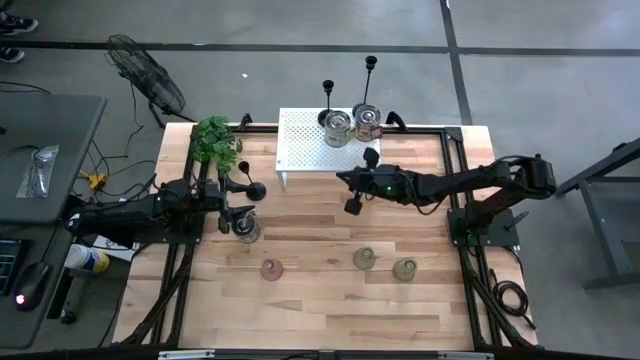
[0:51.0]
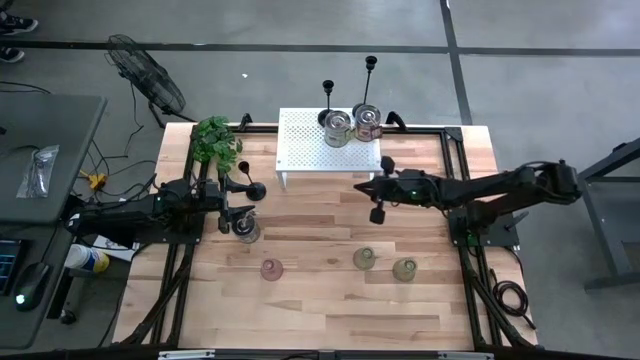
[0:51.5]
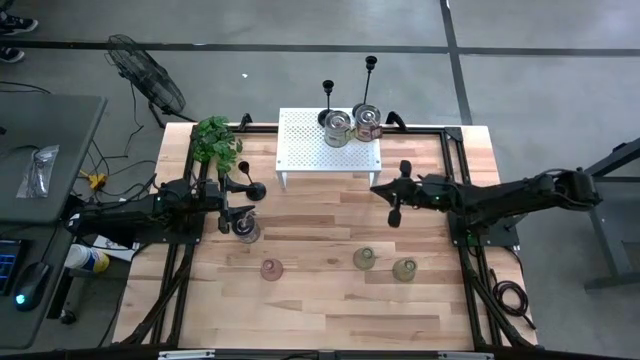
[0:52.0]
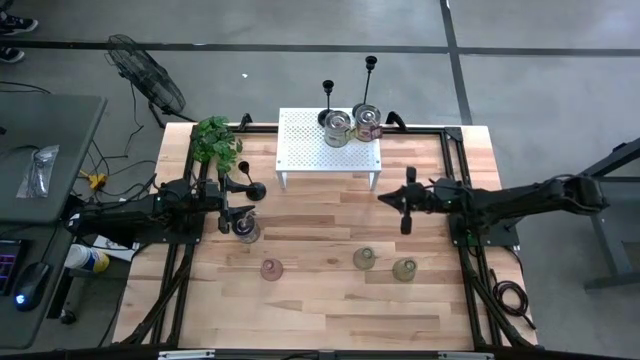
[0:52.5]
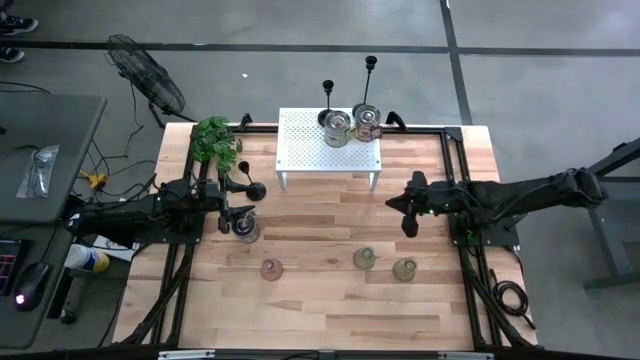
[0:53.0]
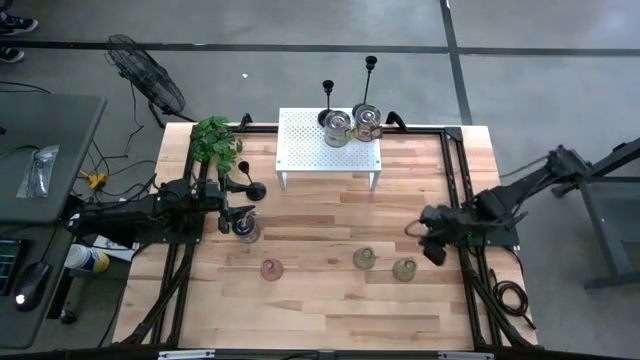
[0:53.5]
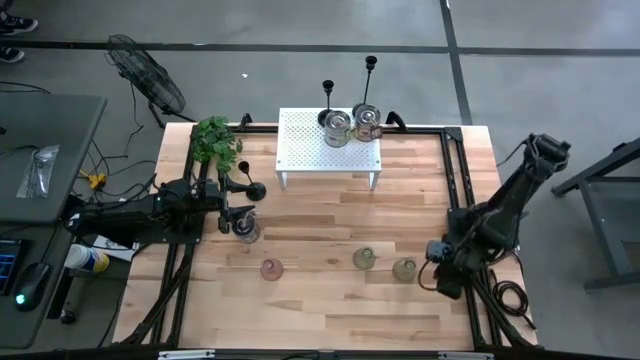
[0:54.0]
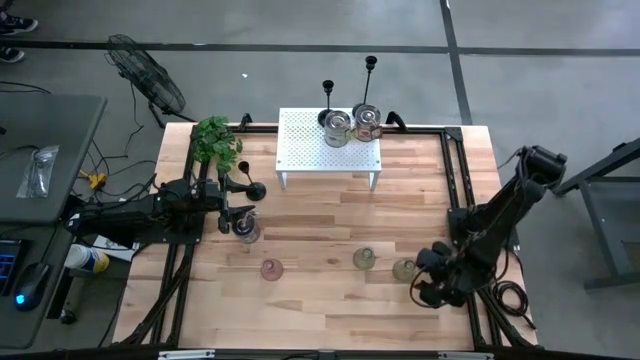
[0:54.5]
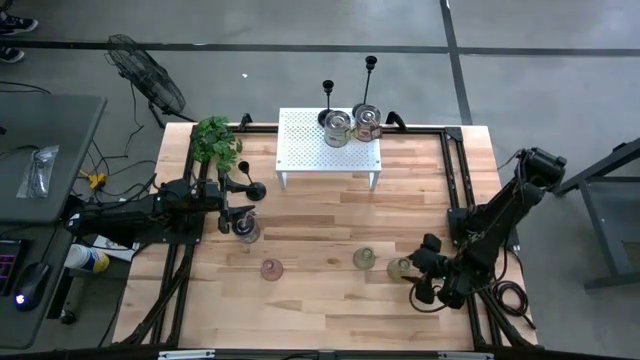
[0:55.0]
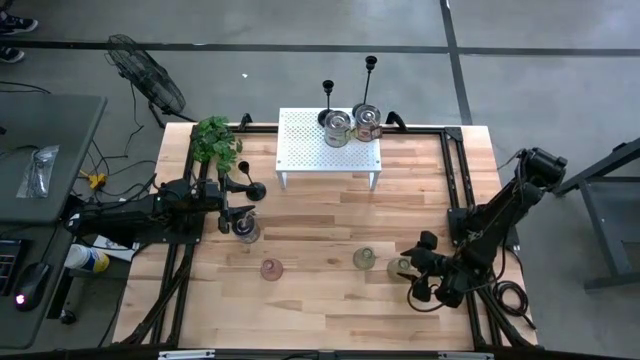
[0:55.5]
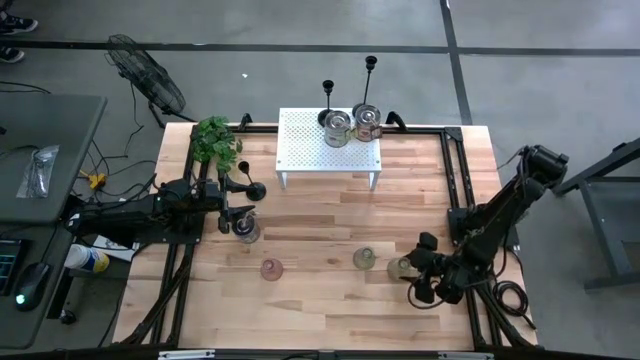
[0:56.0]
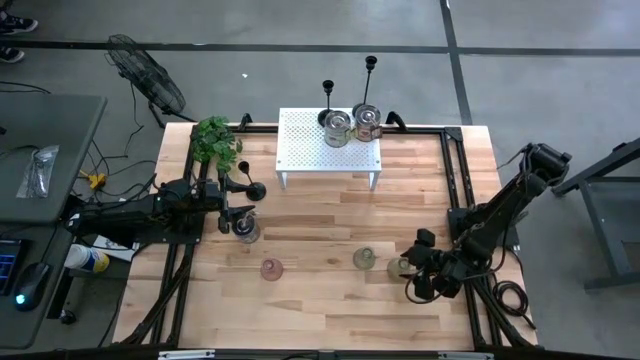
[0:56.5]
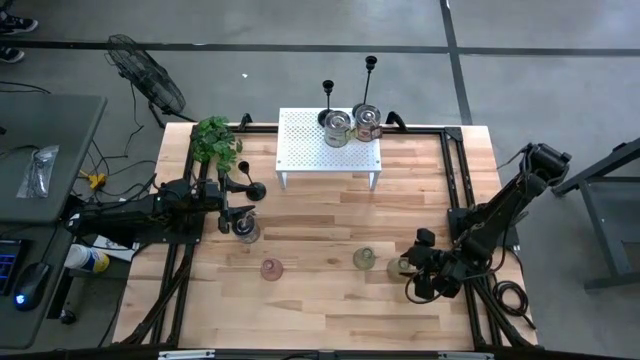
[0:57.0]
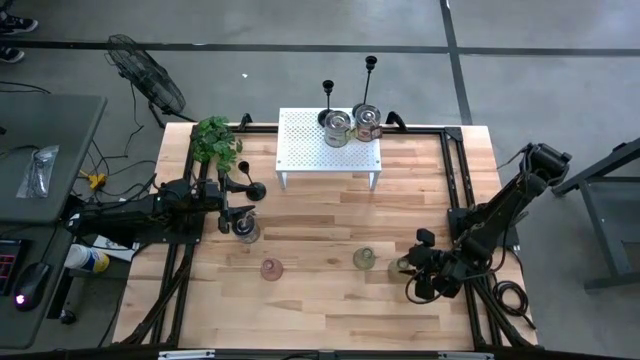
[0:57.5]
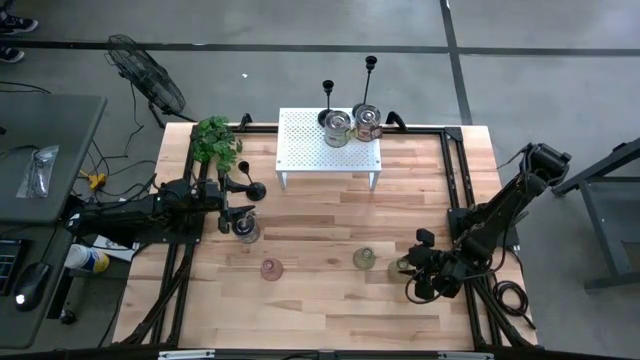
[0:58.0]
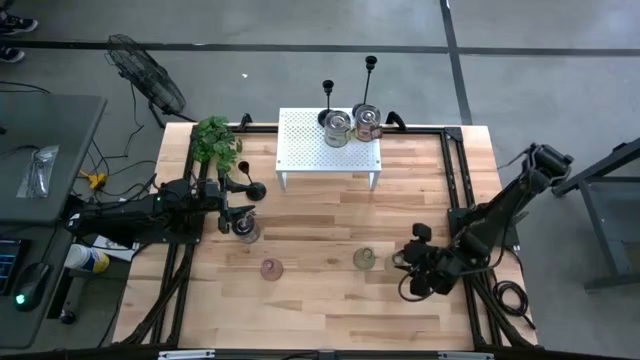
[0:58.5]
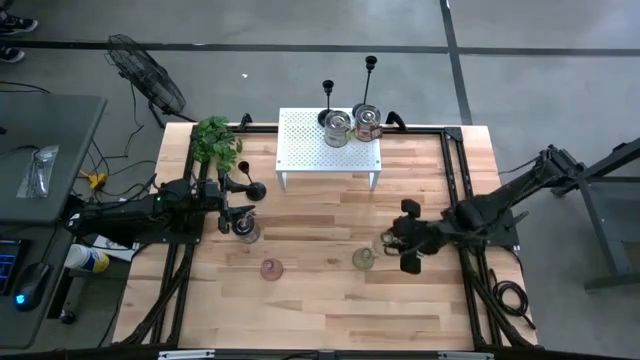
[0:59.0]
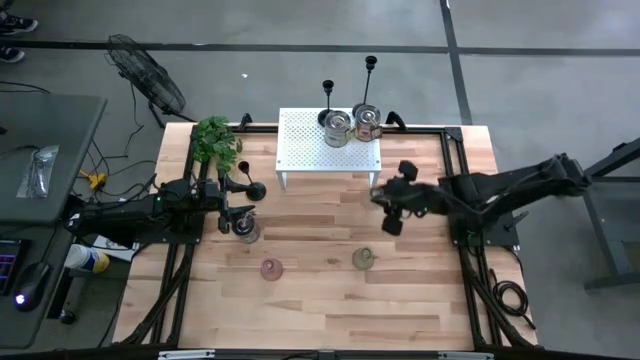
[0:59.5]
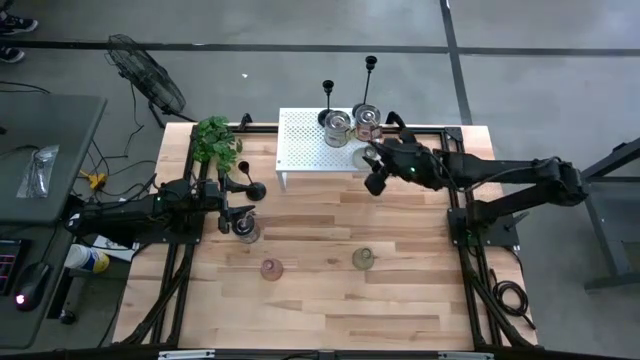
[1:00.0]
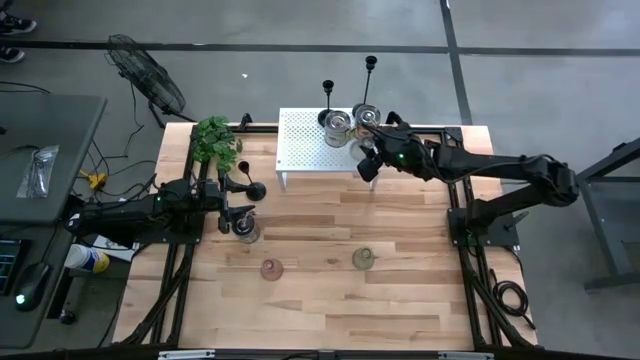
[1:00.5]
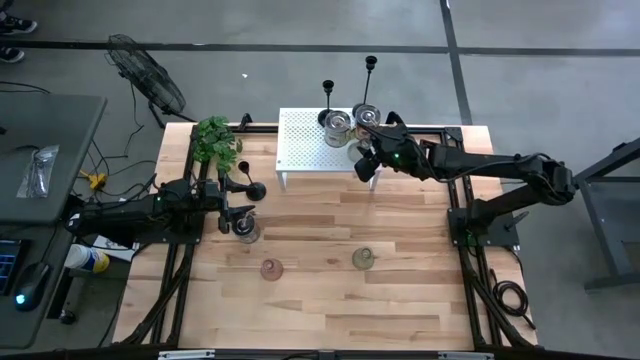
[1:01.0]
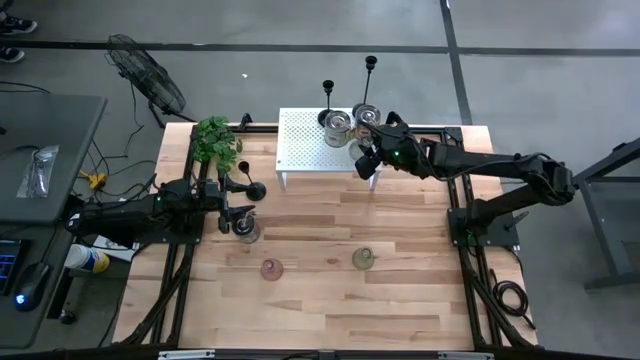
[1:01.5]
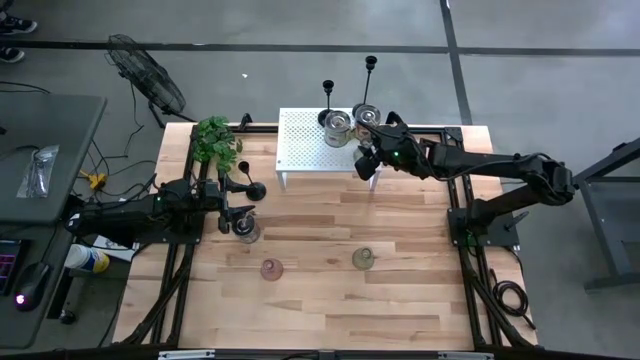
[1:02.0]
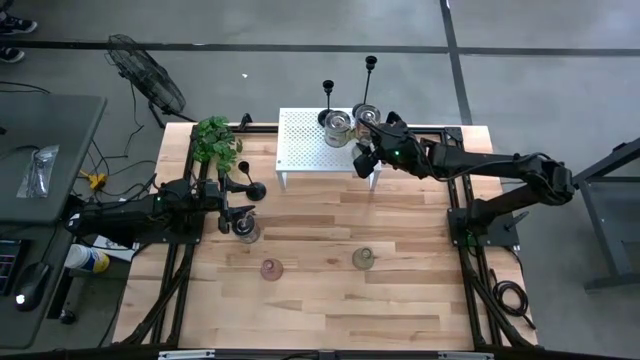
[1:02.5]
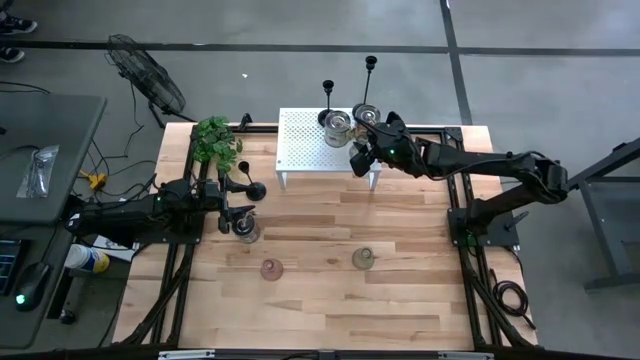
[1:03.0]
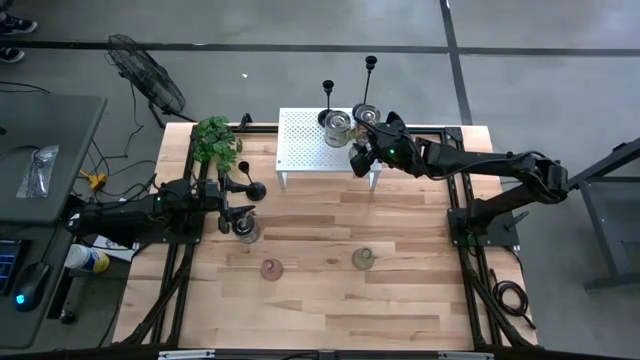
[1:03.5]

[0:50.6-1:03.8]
Task: Pick & Place candle stick holders
Put the right transparent glass candle holder on the shelf

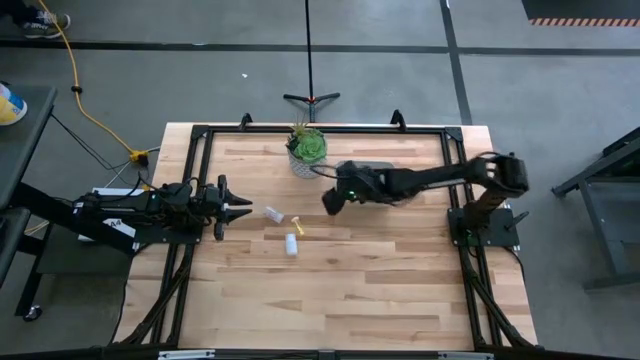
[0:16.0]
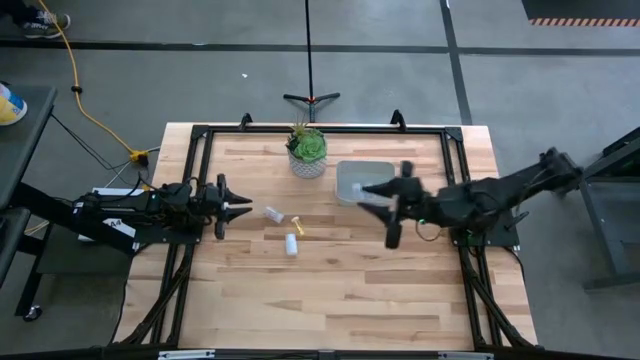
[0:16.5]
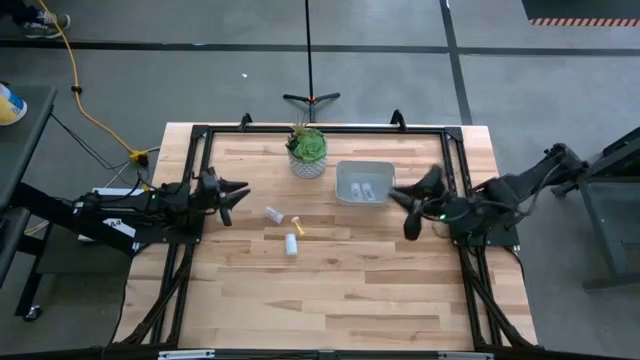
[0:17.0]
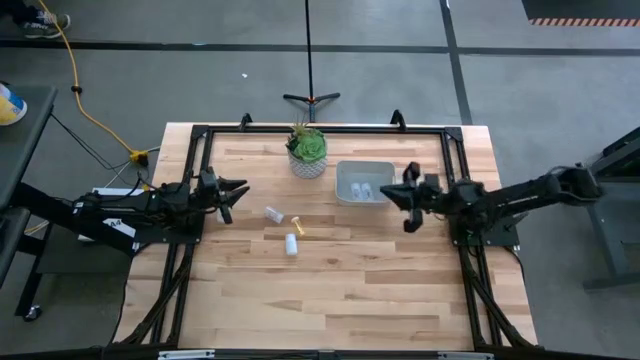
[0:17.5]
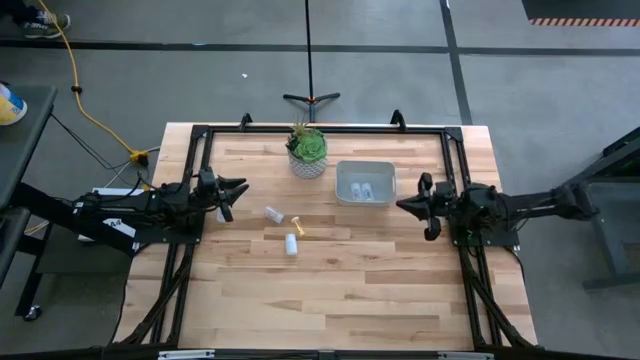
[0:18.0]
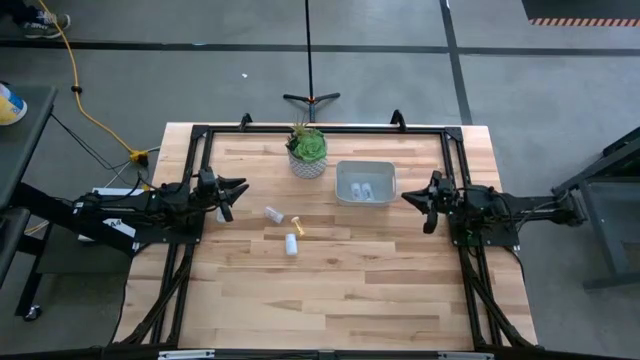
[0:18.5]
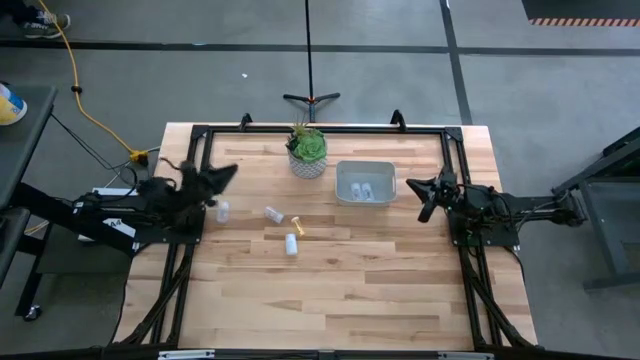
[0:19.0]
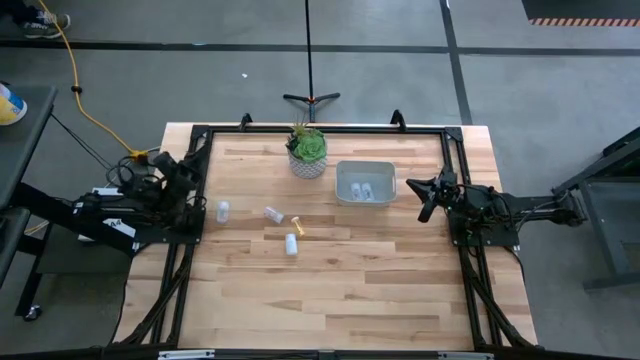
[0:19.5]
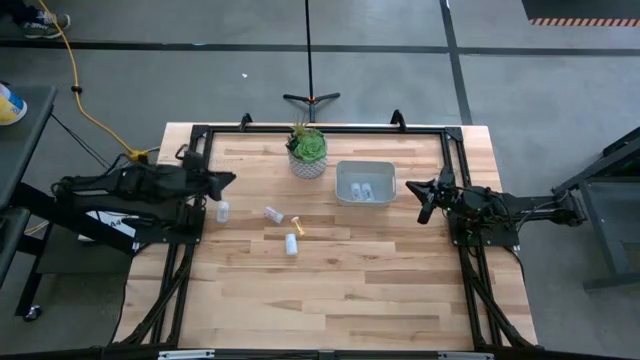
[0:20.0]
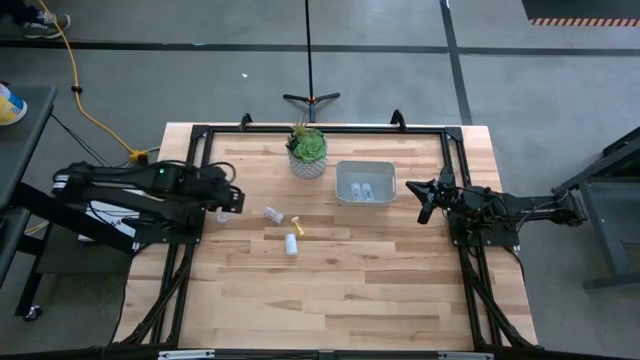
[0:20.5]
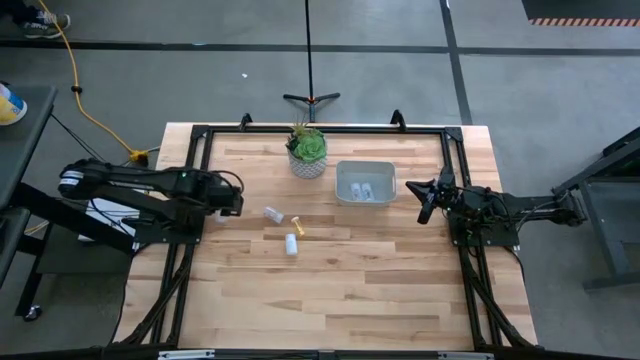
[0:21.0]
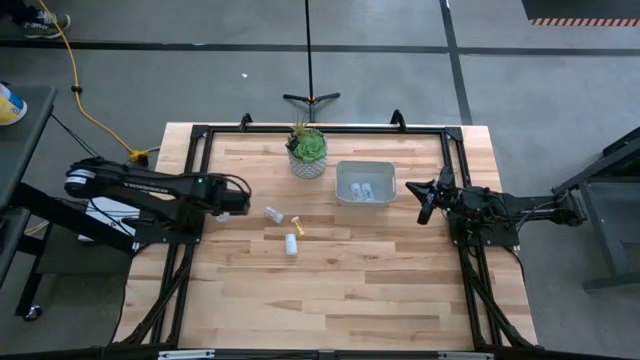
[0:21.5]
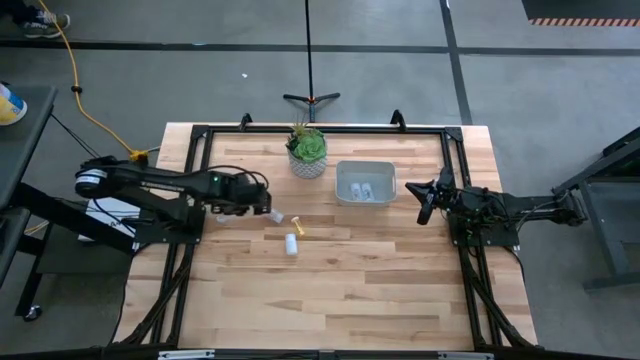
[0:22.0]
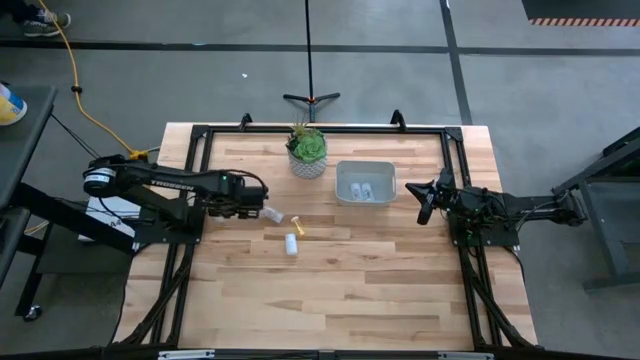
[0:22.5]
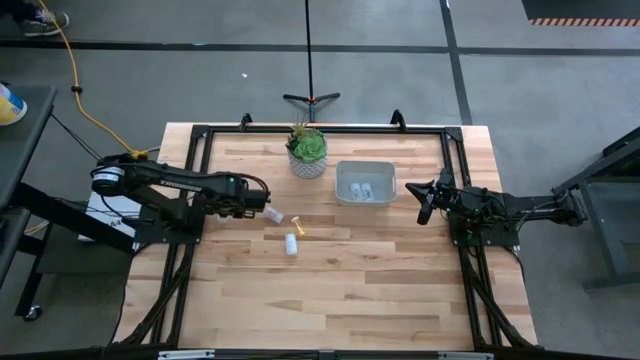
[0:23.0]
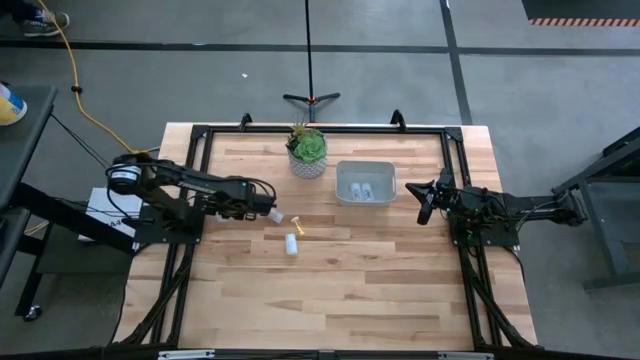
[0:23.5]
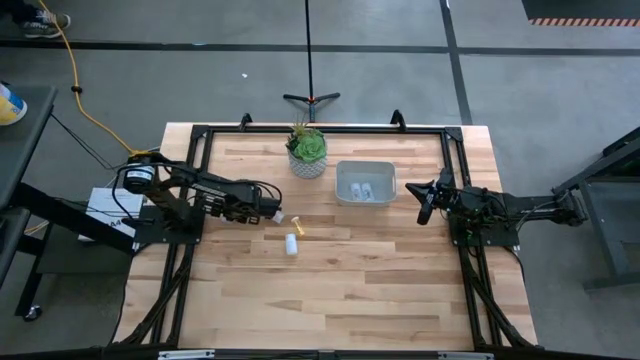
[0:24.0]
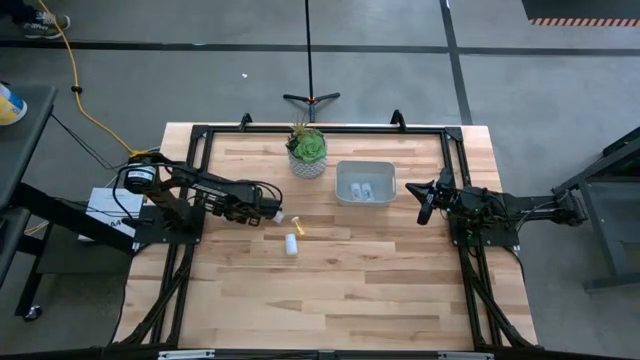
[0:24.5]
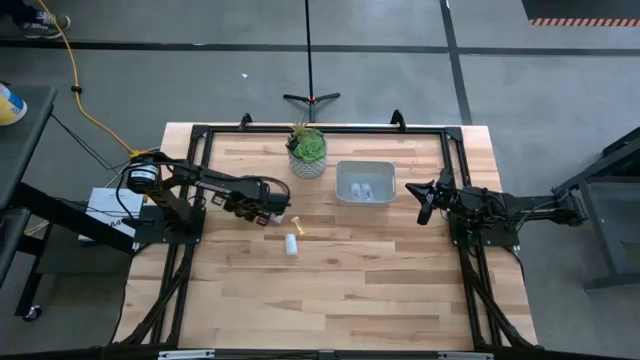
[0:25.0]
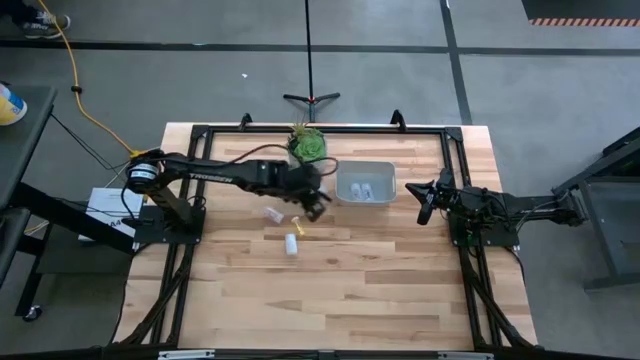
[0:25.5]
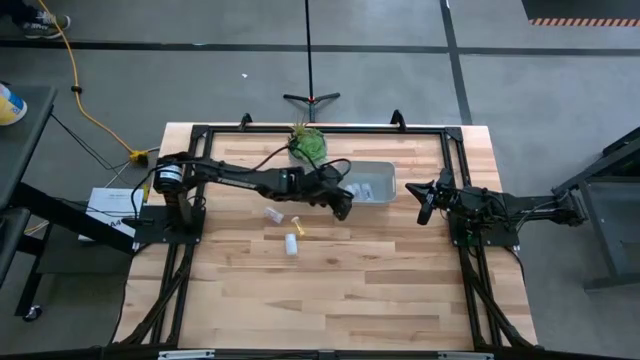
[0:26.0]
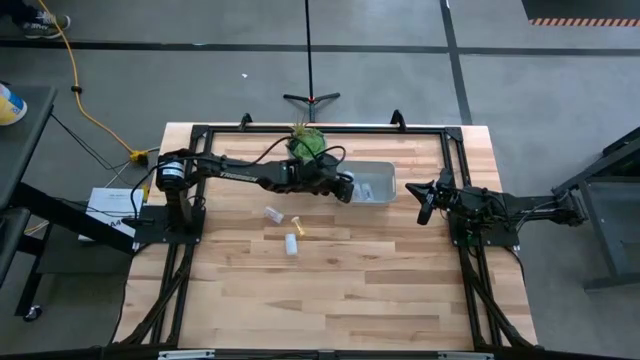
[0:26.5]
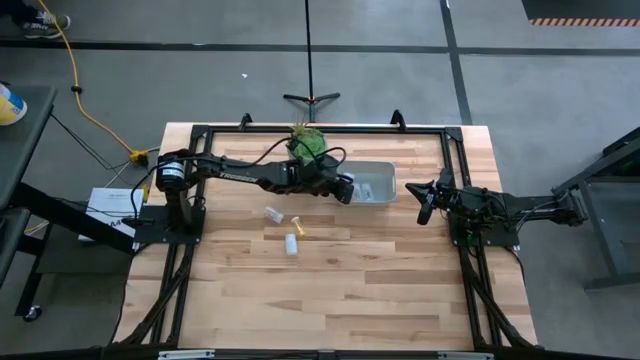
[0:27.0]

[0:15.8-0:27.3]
Task: Pick and place pill bottles into a basket
Put the transparent medicine bottle into the gray bin
